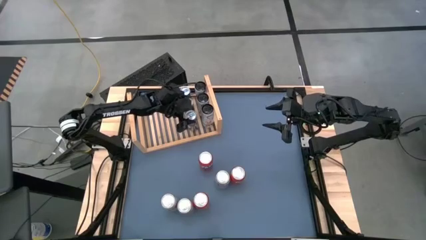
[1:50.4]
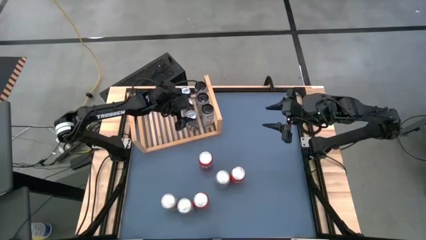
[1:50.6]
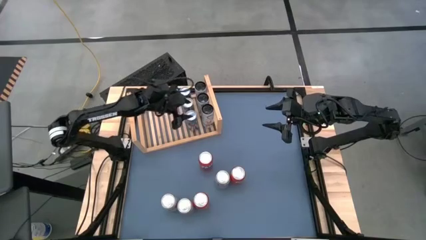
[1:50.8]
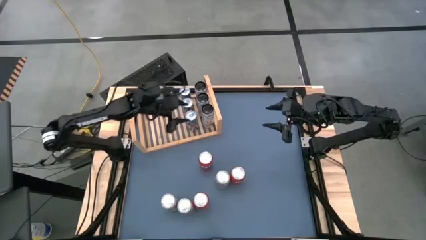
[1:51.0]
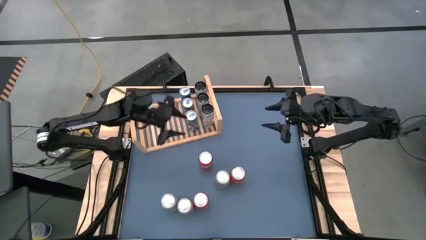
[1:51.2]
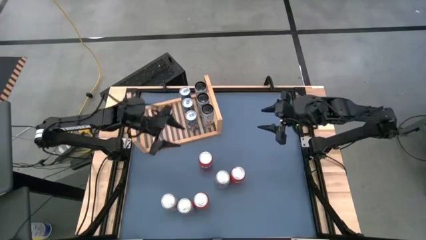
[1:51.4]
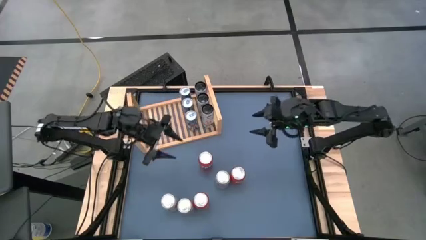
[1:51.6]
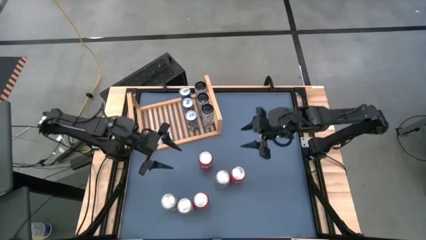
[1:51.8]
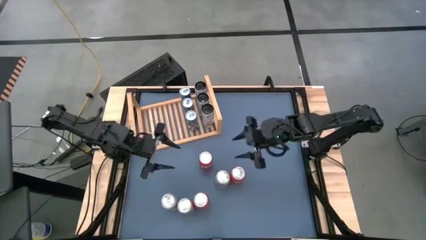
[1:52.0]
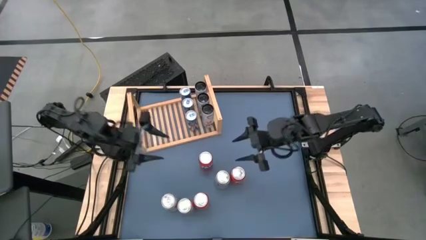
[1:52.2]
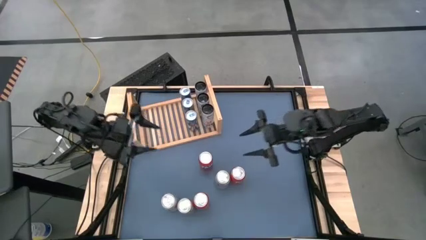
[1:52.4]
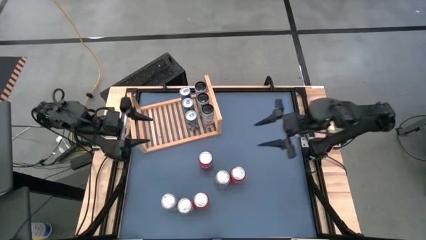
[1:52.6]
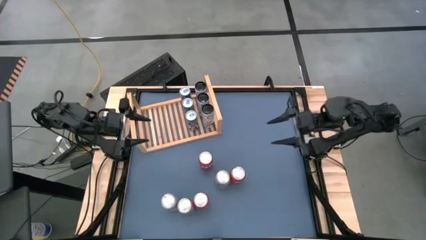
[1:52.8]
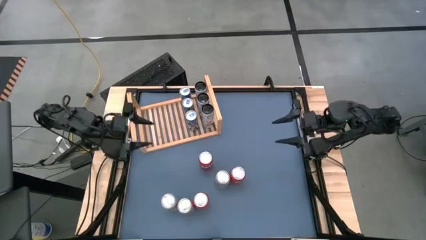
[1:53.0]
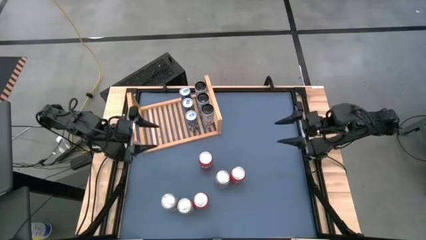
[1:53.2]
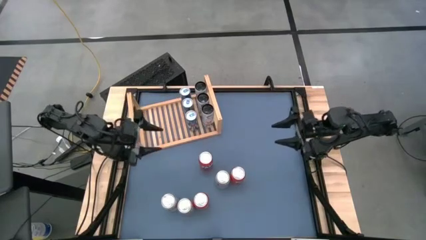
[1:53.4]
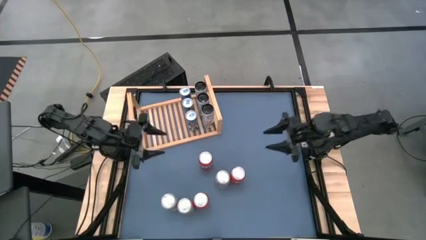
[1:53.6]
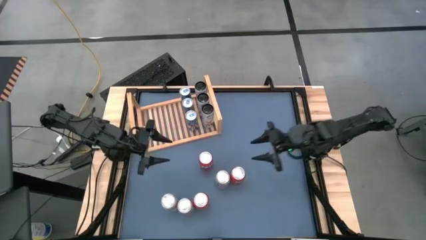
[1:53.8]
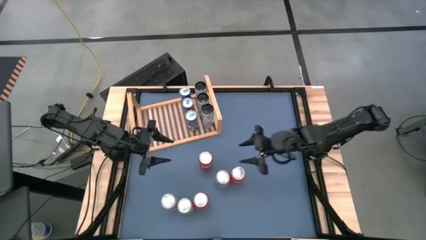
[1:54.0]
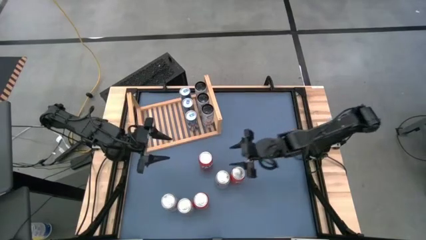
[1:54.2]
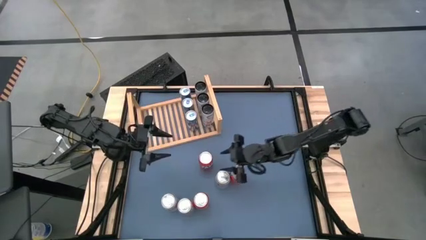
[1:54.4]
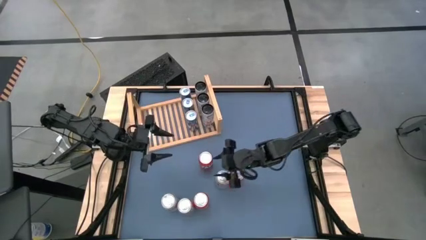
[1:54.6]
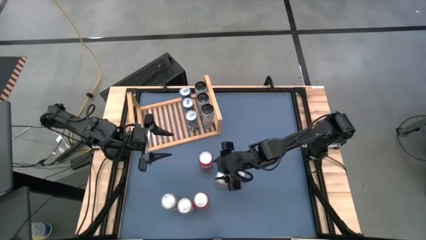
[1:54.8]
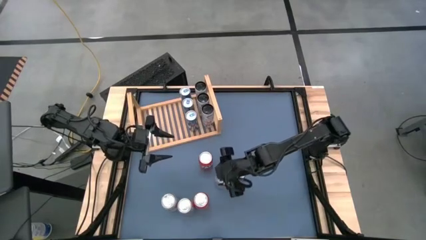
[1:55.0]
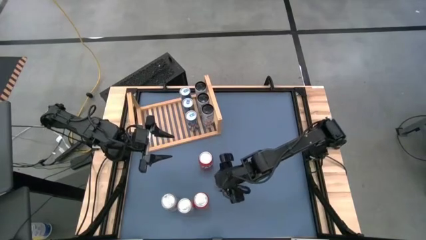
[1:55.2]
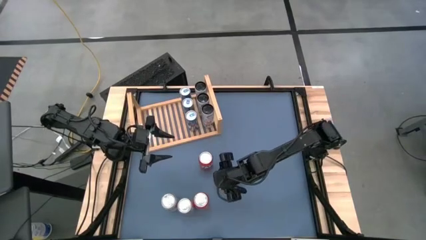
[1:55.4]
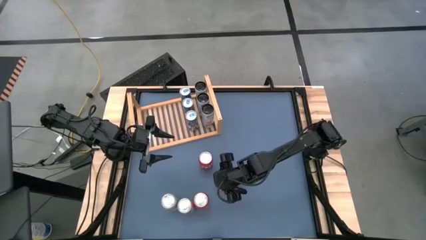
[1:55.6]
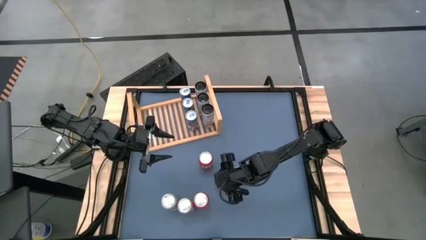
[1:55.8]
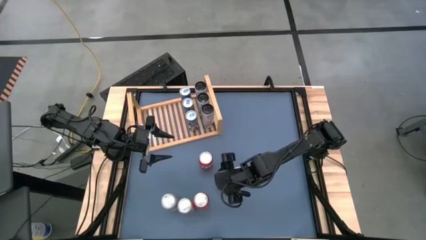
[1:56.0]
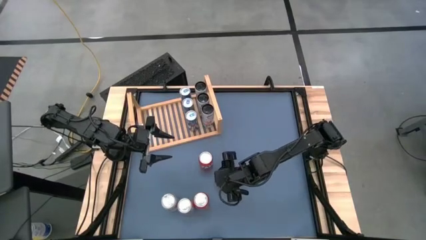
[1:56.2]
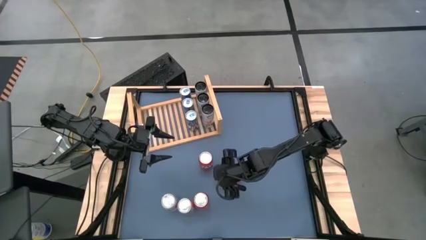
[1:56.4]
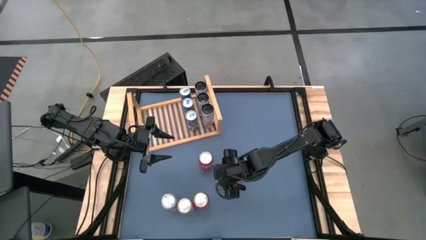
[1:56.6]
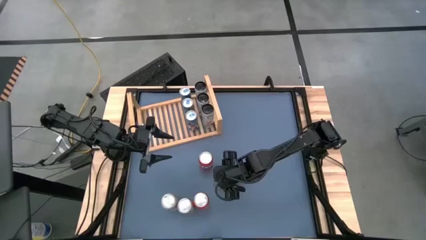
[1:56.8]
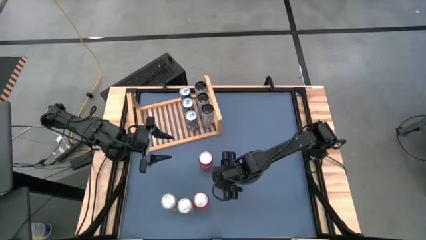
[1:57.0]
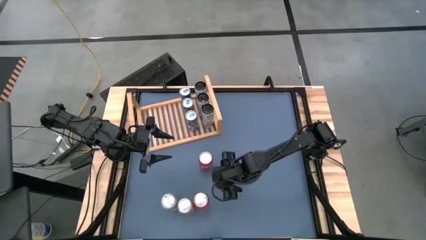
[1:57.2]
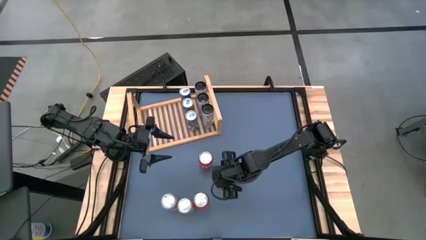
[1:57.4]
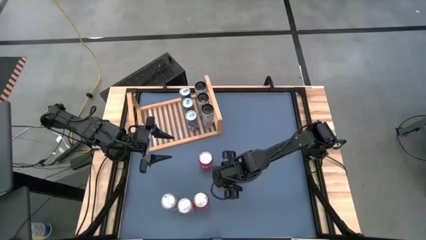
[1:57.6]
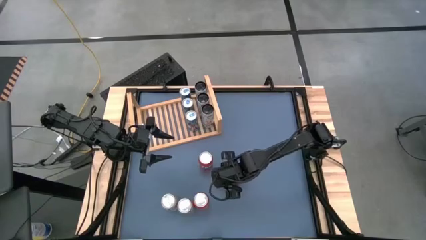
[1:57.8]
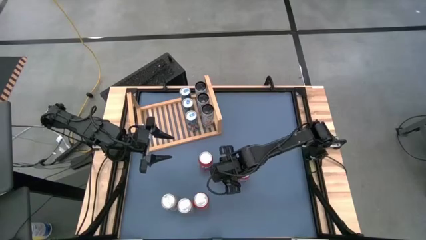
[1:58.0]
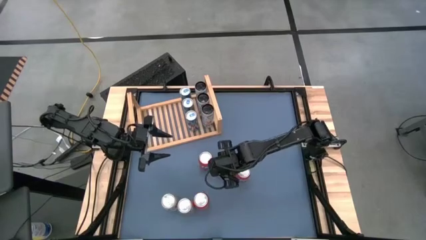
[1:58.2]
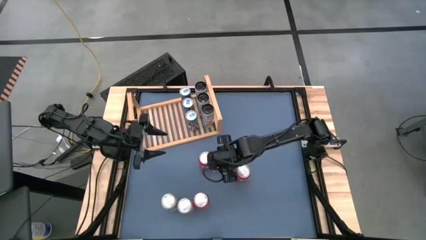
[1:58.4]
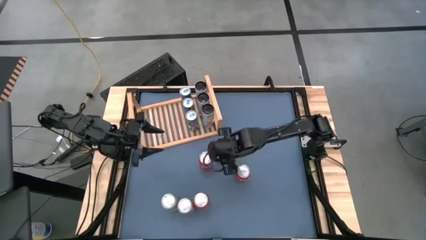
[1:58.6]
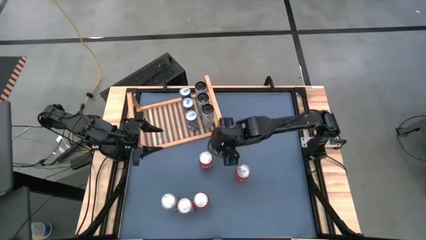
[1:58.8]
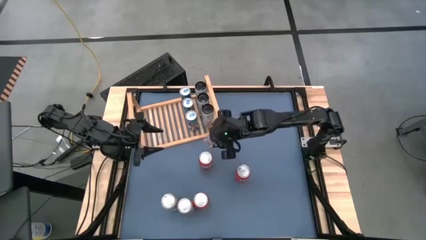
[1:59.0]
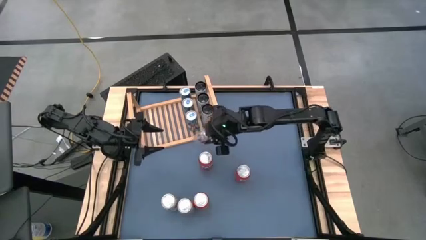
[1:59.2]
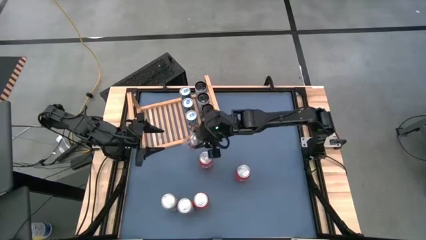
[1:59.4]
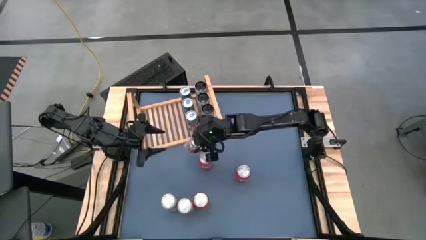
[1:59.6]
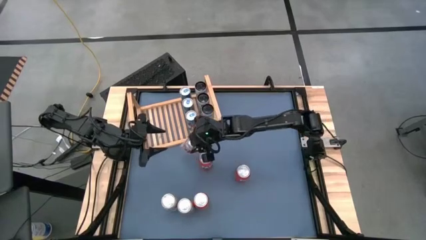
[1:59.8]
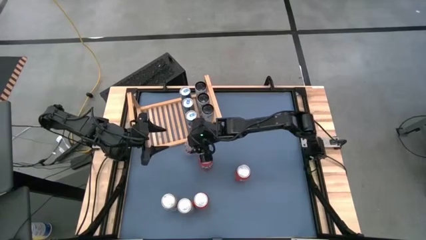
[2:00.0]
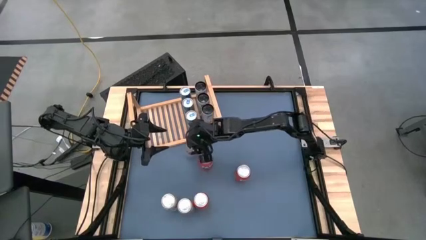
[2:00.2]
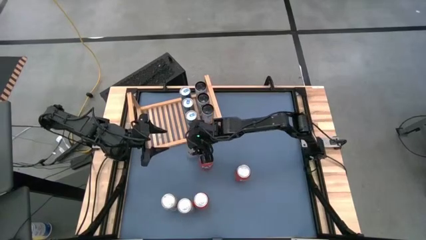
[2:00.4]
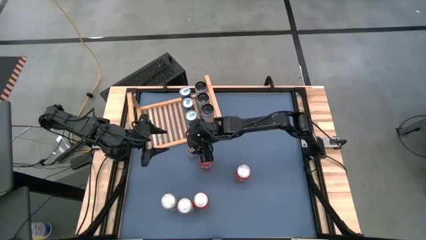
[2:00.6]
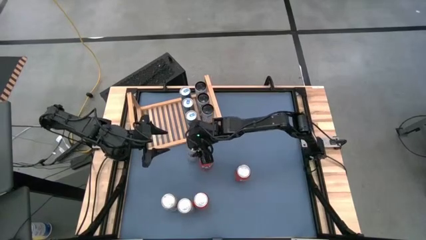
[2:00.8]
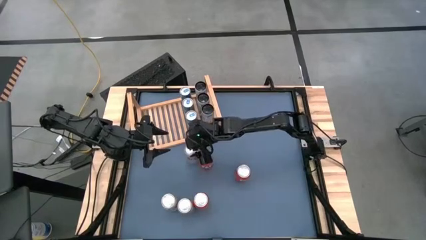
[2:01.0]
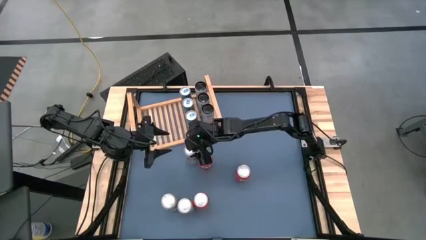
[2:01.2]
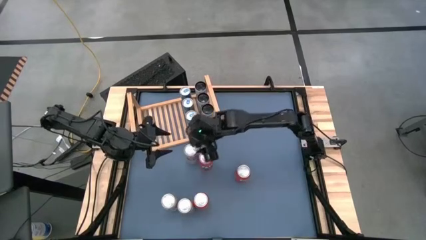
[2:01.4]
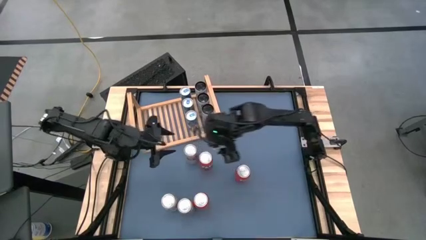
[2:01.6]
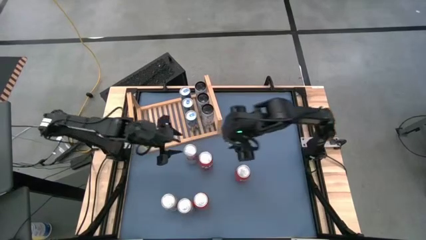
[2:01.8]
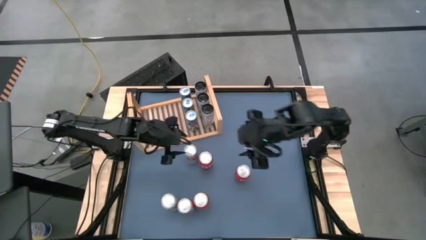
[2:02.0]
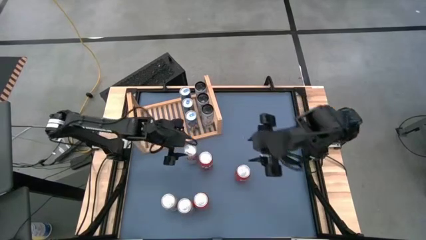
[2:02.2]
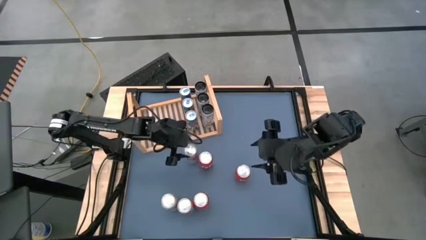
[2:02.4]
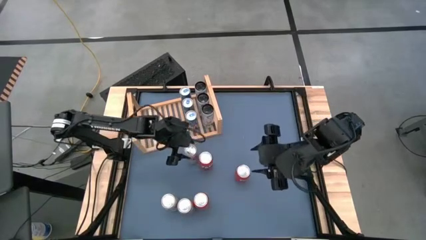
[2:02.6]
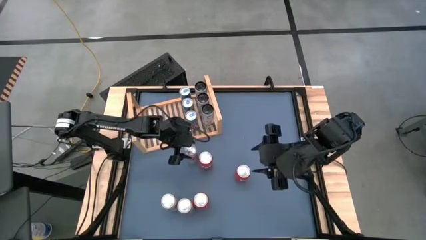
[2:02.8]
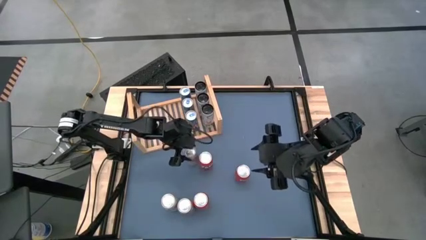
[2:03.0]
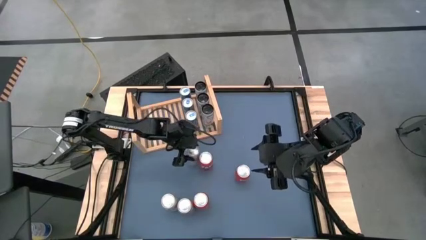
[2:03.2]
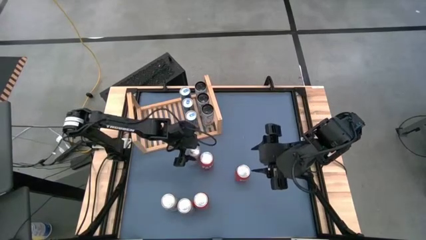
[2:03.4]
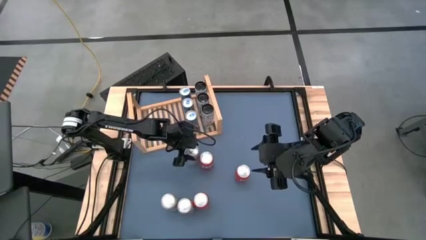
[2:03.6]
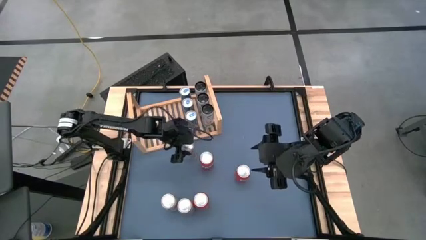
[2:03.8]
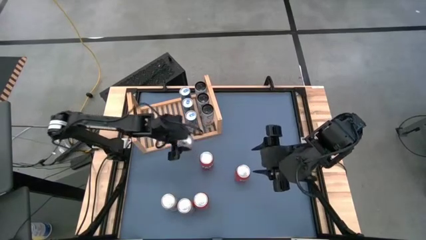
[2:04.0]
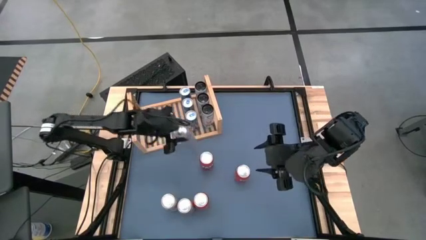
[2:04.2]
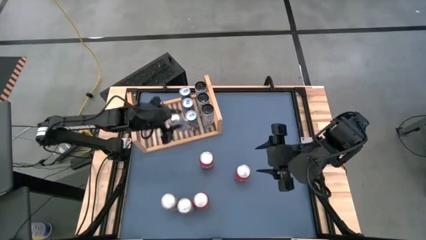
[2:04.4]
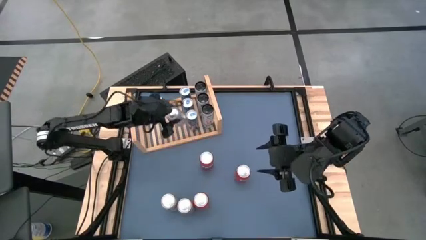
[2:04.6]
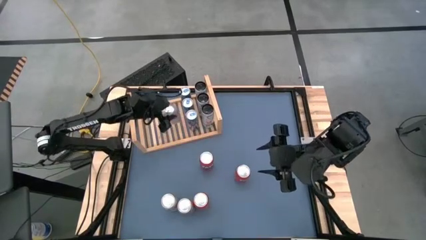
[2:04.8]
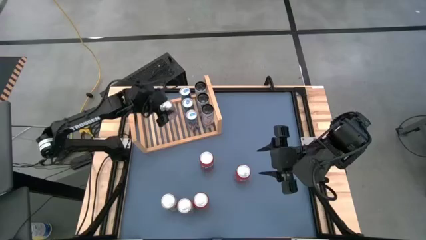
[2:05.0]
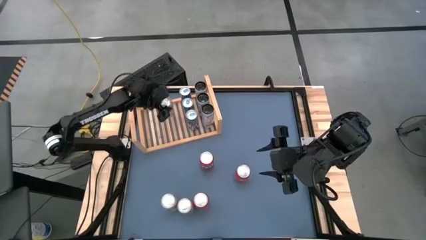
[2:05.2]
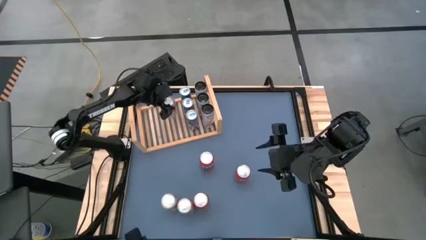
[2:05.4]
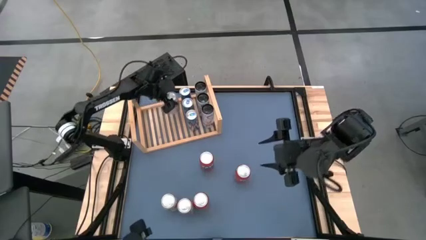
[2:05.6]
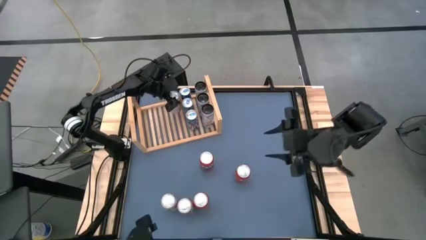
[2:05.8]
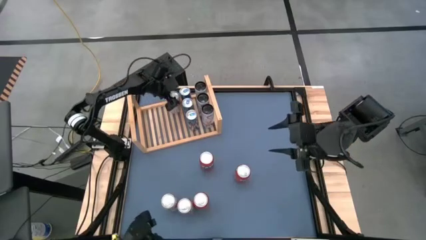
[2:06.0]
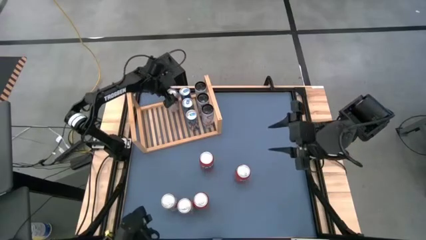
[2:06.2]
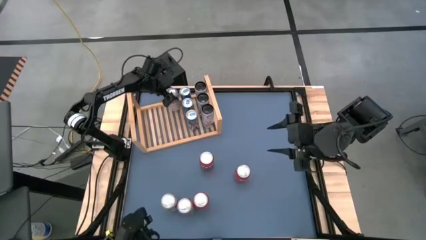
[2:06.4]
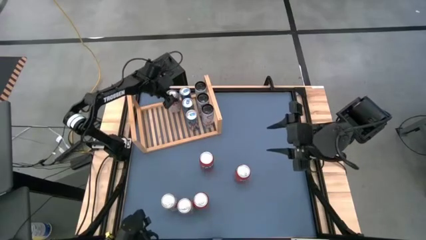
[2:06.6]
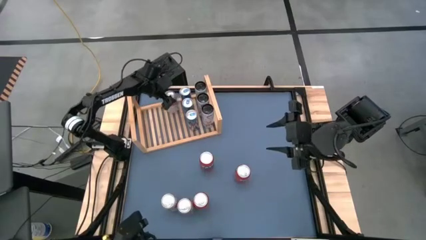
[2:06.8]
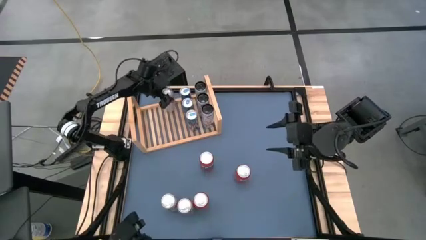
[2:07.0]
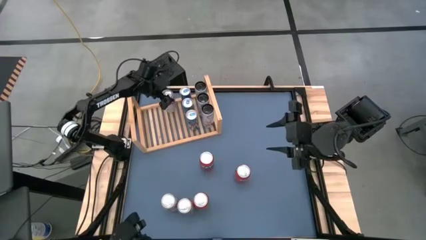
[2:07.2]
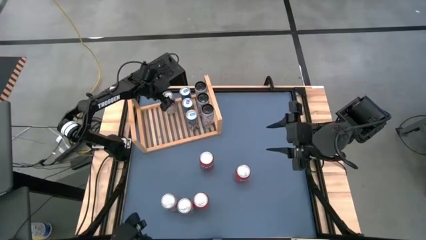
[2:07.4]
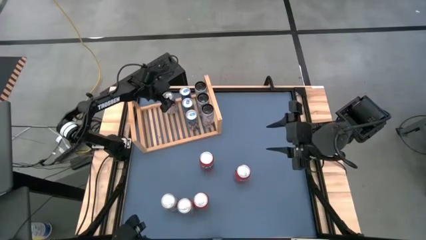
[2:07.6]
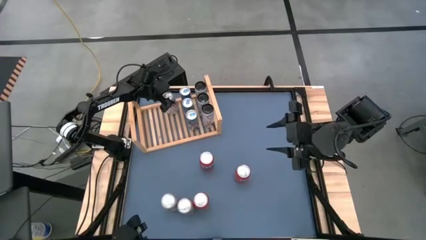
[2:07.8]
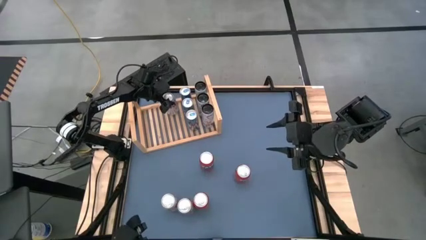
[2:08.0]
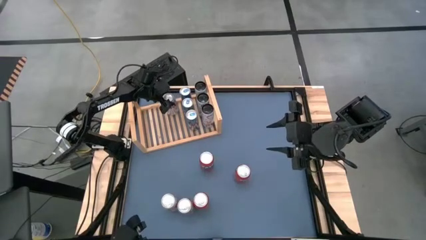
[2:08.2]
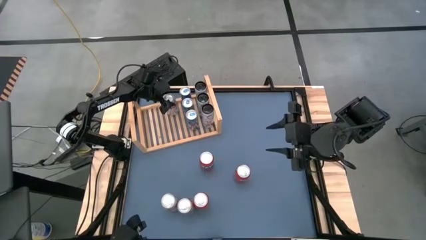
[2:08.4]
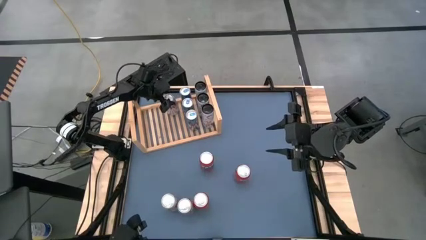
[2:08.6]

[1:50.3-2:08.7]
Task: Place canned beverage on shelf
Put the right silver soda can on the shelf
